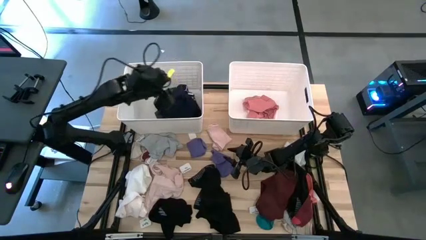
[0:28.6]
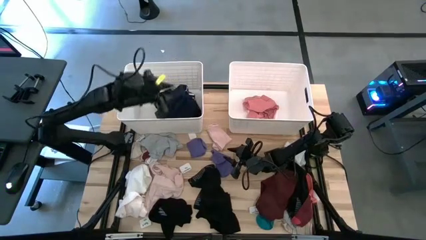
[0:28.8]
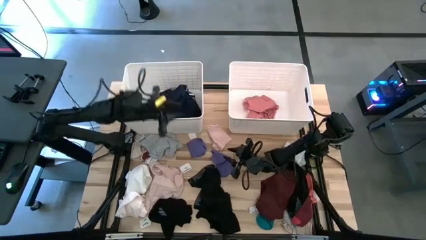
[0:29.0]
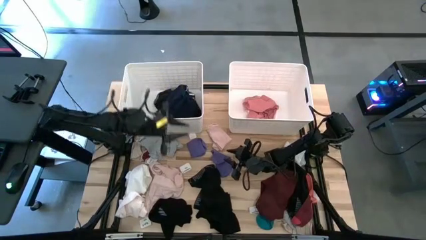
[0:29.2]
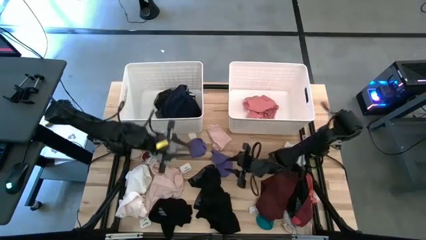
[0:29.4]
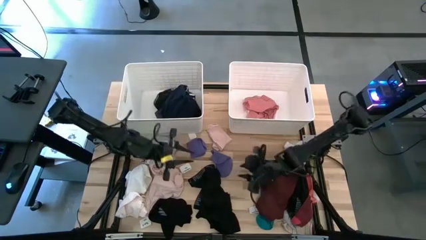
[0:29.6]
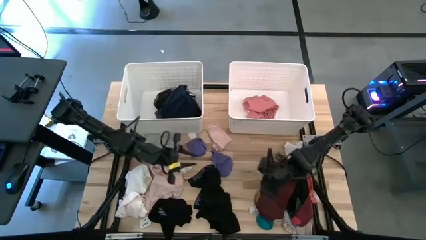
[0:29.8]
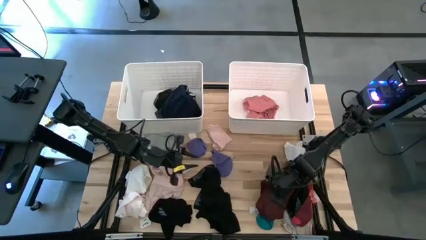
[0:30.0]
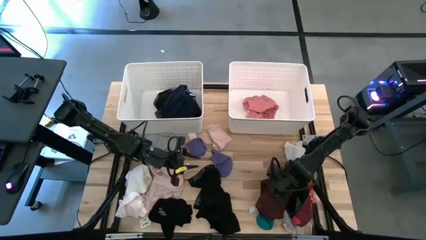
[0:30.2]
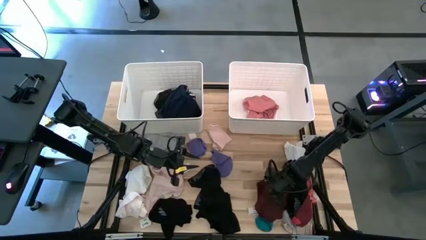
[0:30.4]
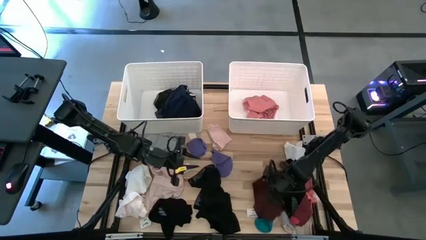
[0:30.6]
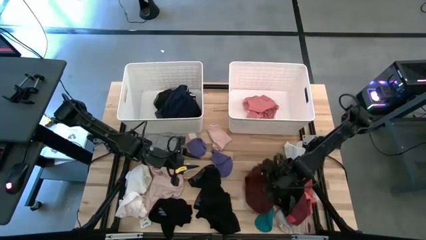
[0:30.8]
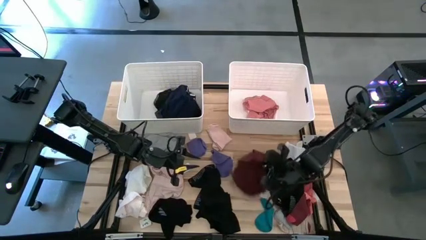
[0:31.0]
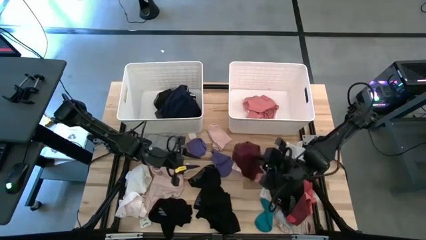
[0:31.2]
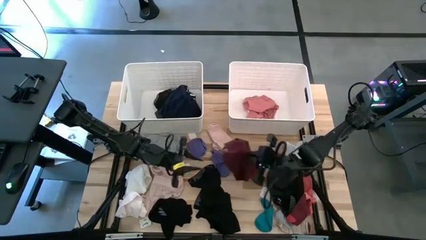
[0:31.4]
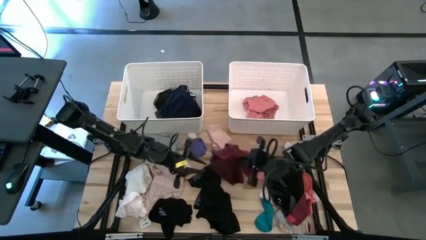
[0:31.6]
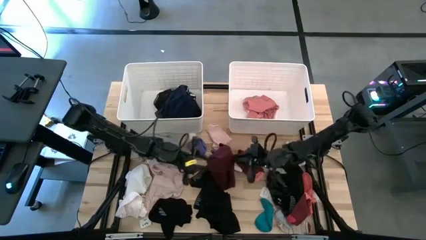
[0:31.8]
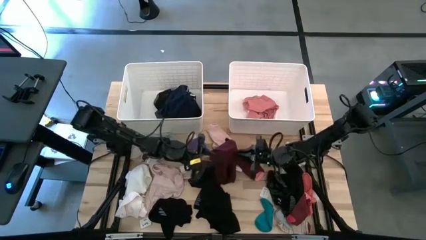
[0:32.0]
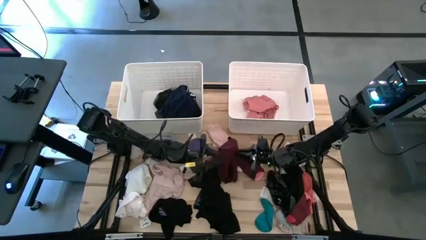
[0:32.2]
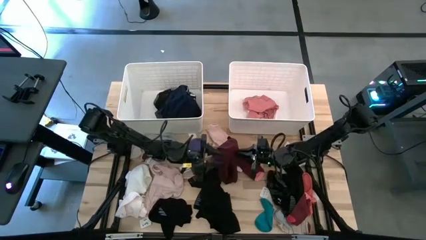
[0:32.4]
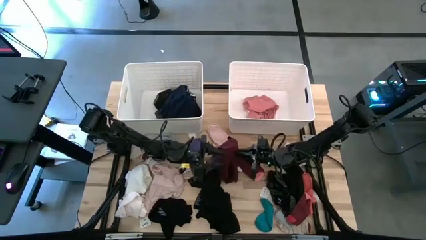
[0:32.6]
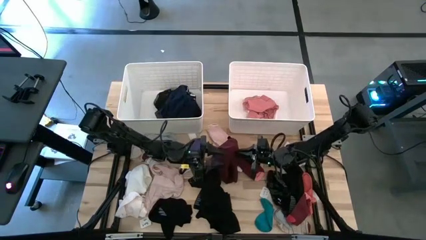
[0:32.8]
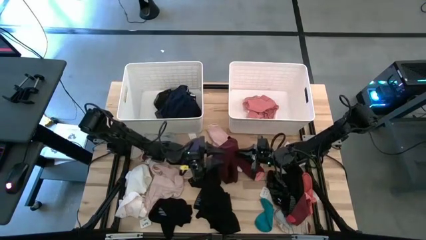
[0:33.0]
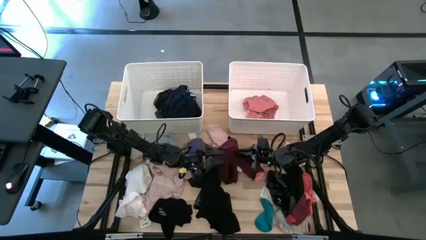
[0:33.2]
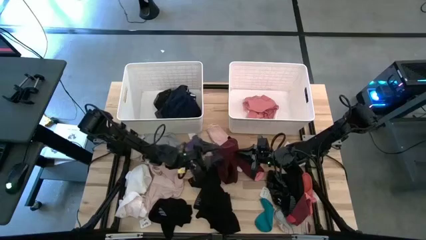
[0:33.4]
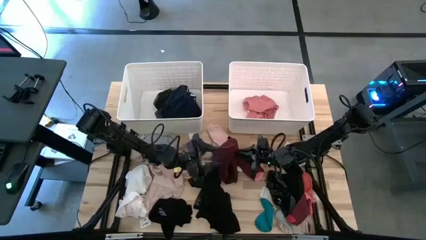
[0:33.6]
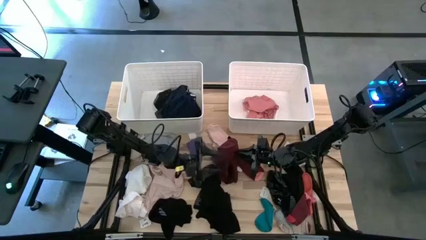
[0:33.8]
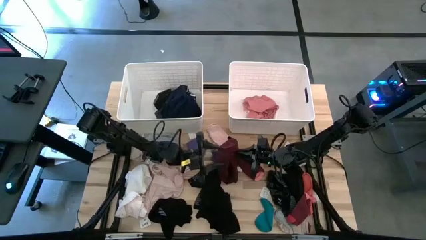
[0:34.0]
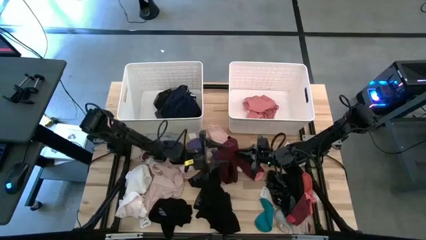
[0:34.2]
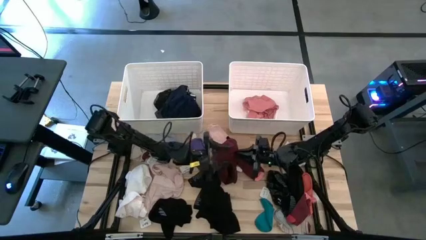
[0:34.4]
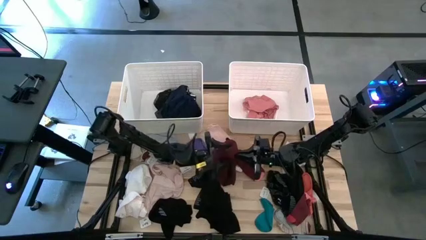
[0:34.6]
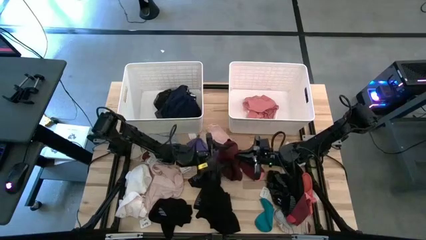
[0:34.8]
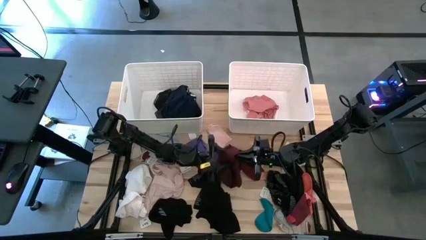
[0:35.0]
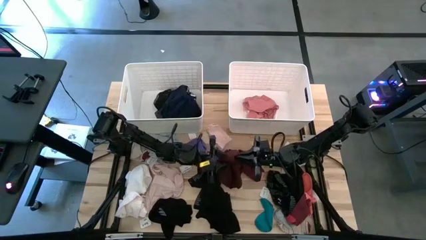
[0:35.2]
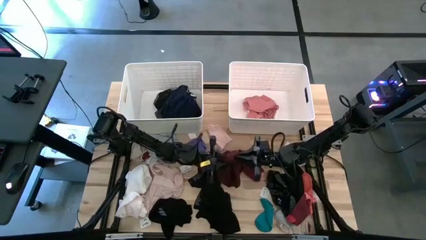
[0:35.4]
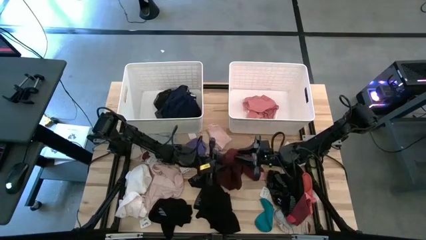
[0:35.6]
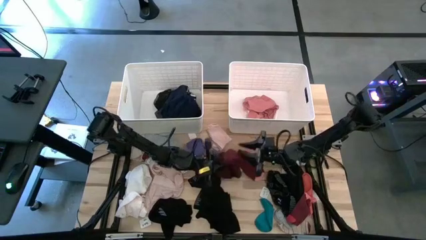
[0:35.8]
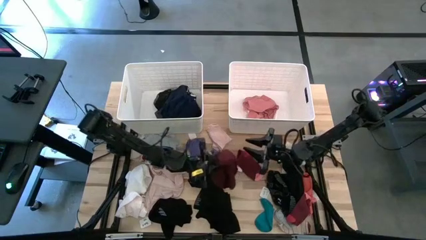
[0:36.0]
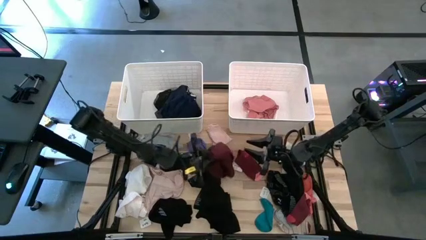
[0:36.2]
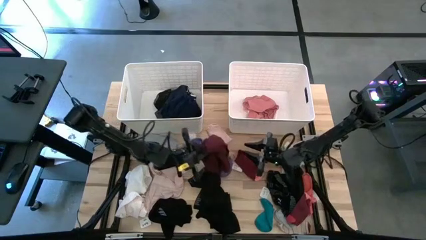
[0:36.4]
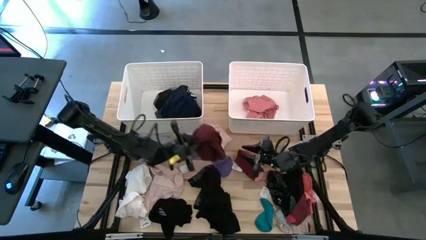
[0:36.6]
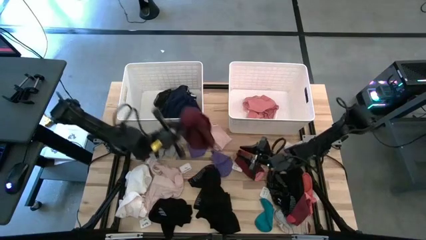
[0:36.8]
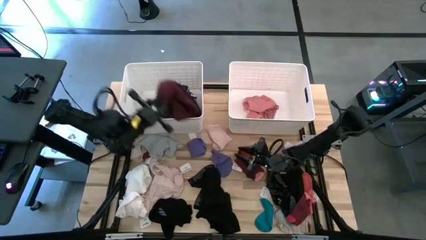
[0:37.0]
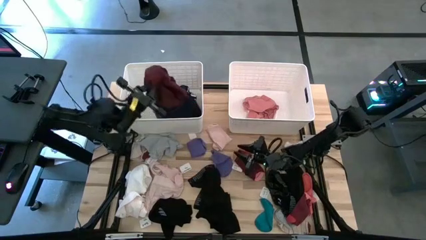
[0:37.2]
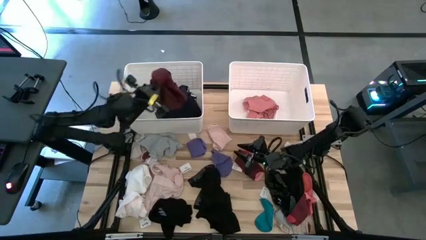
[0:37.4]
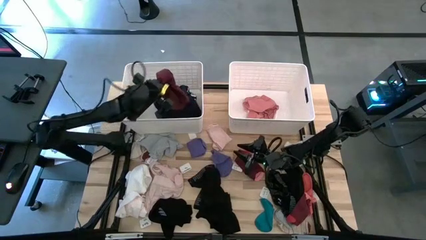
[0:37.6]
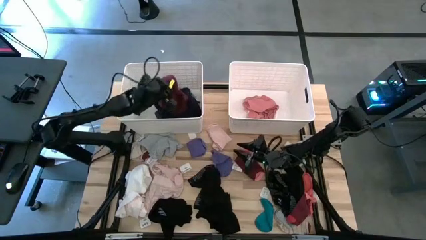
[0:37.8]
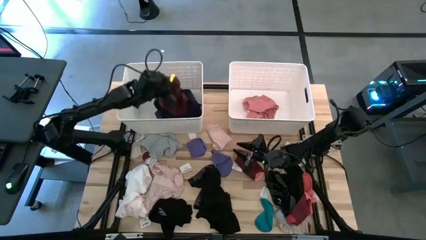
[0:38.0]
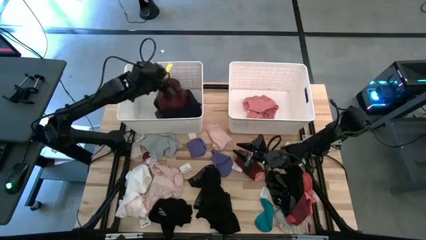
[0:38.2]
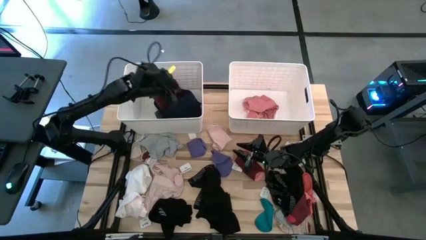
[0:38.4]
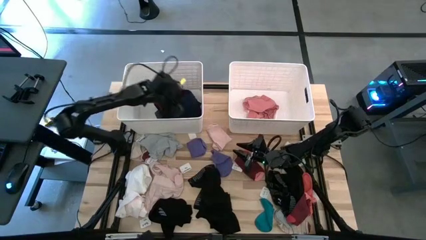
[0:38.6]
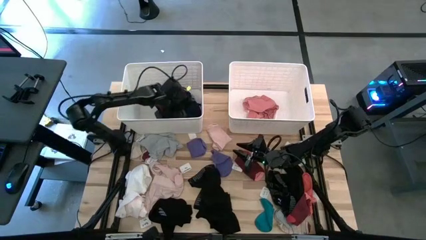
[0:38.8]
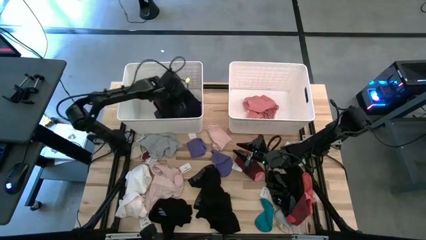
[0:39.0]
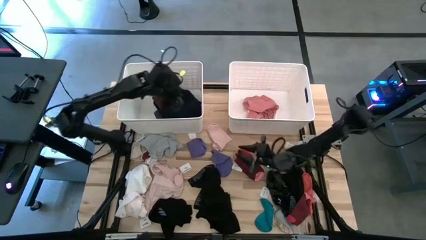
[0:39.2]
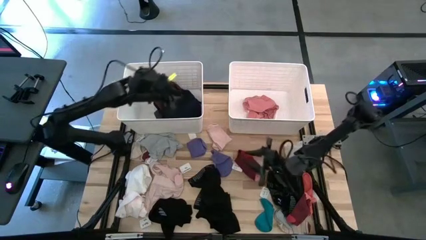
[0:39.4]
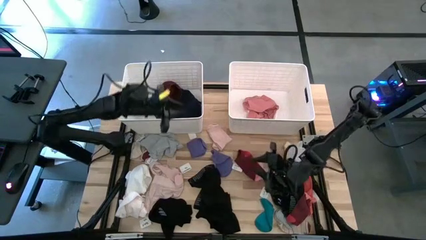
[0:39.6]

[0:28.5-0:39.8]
Task: Sort clothes
Put the red shorts into the left white laundry bin

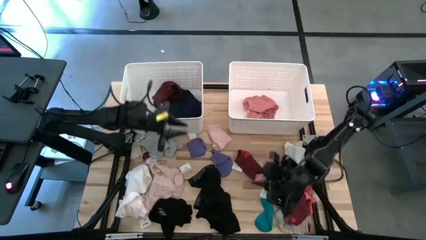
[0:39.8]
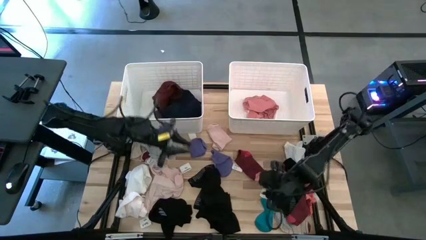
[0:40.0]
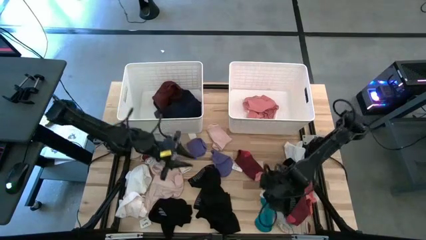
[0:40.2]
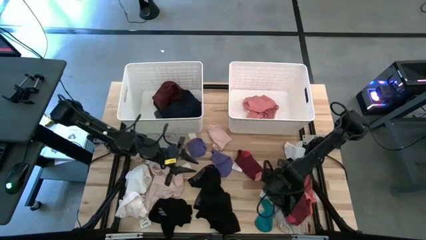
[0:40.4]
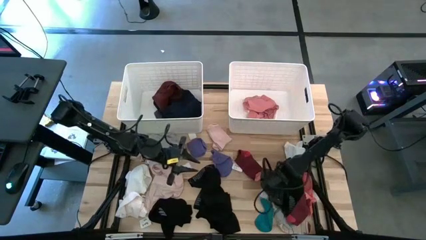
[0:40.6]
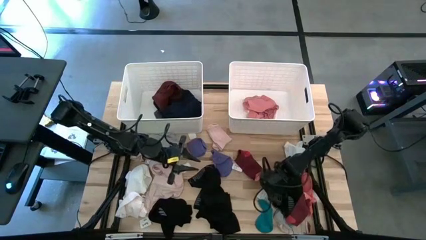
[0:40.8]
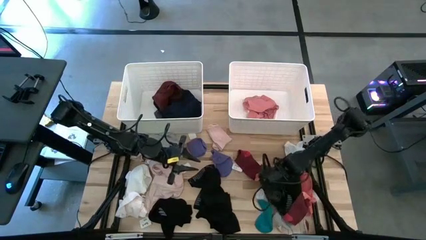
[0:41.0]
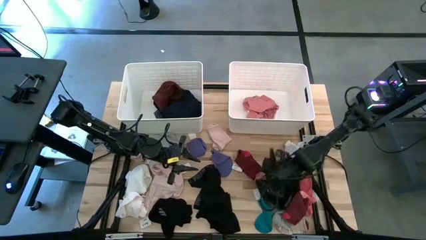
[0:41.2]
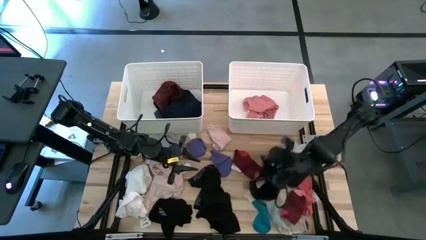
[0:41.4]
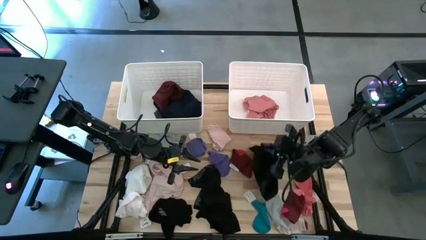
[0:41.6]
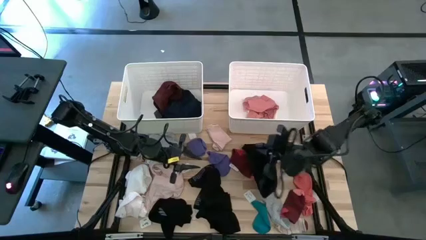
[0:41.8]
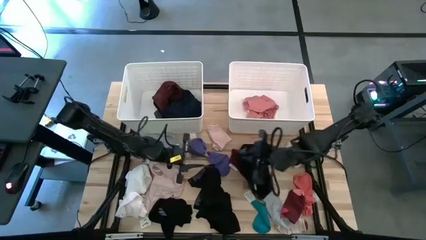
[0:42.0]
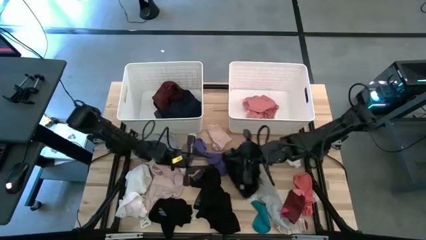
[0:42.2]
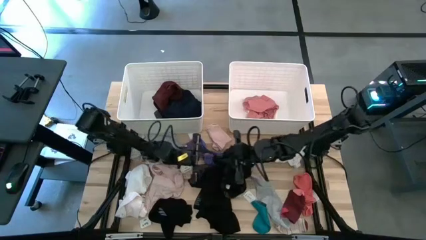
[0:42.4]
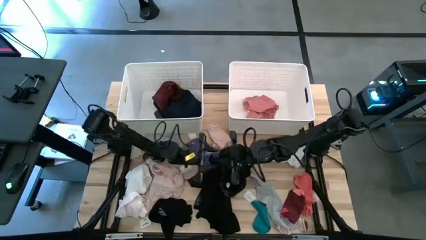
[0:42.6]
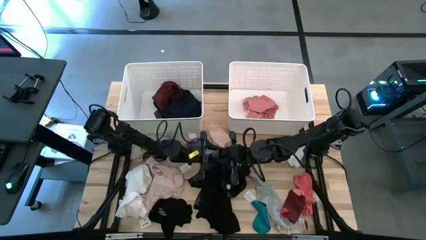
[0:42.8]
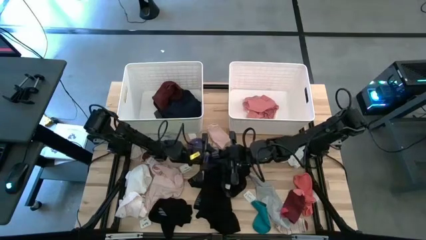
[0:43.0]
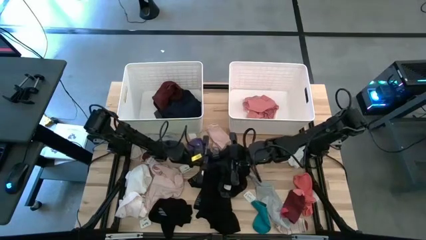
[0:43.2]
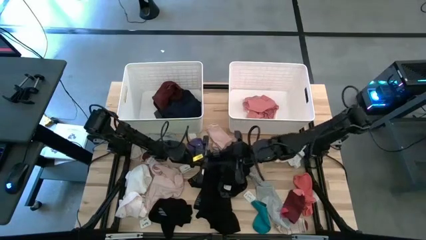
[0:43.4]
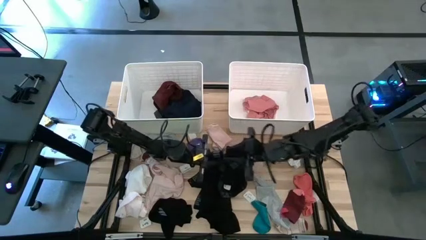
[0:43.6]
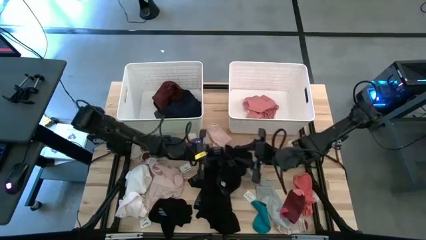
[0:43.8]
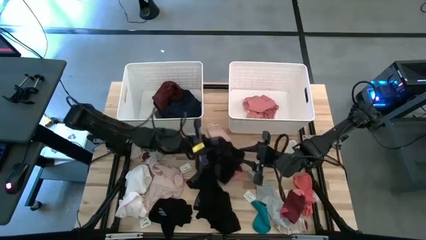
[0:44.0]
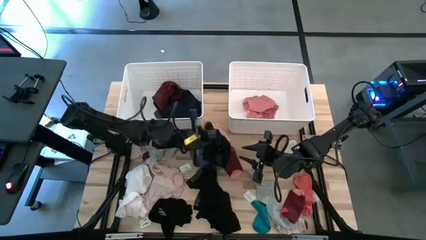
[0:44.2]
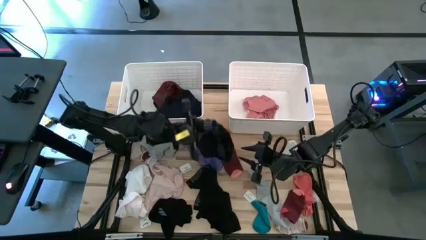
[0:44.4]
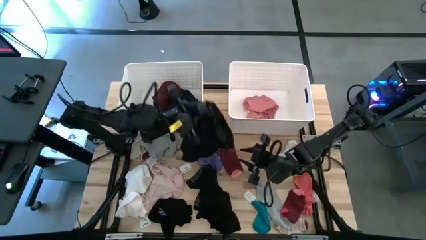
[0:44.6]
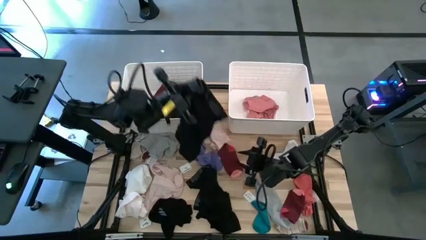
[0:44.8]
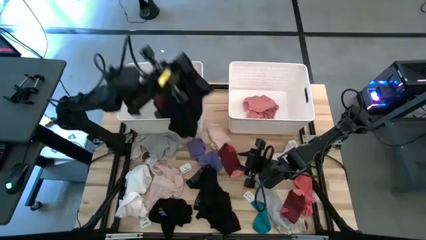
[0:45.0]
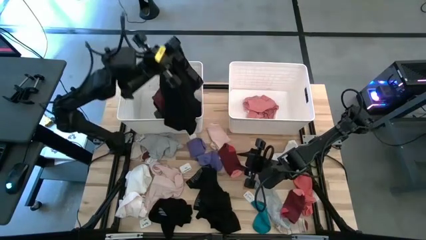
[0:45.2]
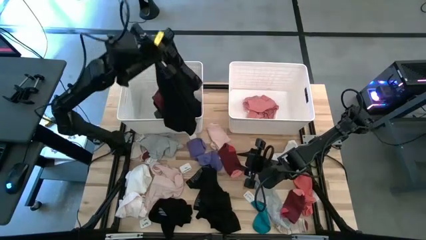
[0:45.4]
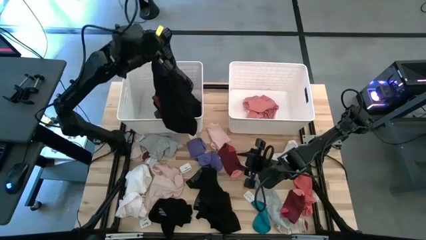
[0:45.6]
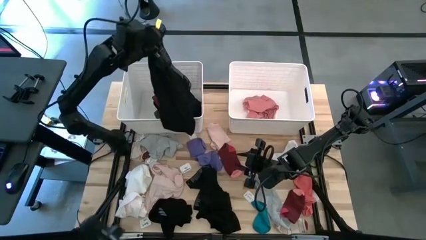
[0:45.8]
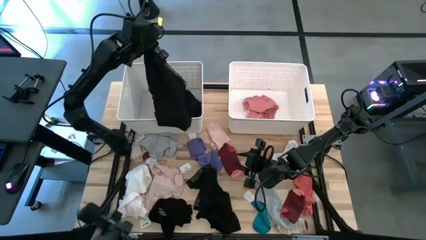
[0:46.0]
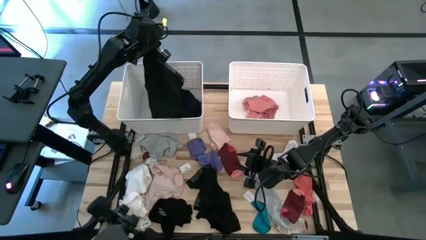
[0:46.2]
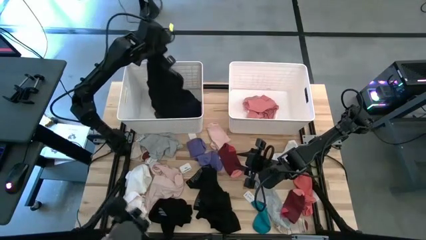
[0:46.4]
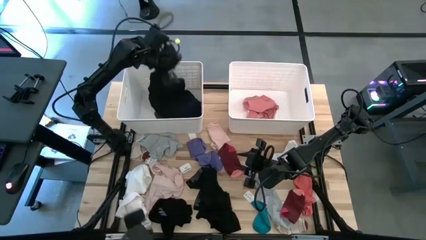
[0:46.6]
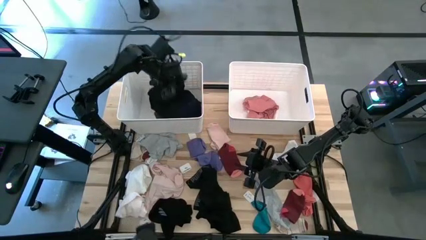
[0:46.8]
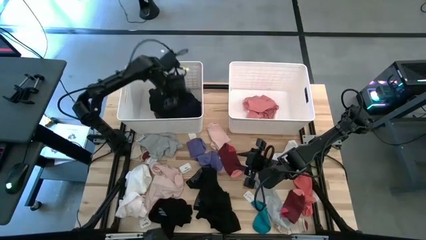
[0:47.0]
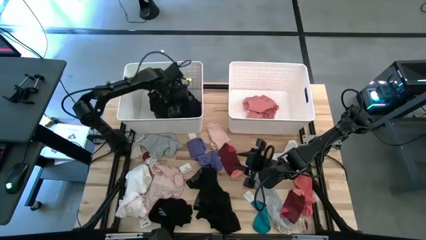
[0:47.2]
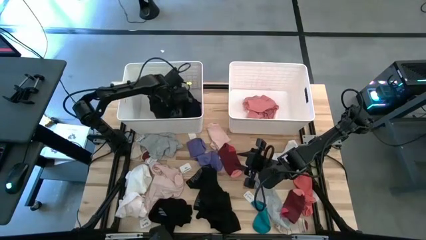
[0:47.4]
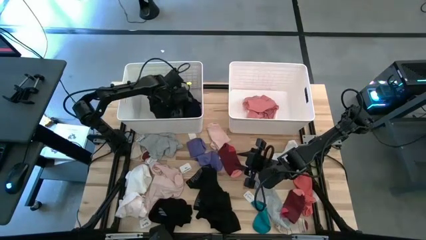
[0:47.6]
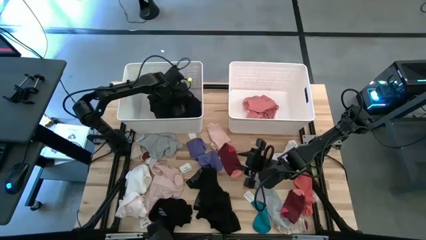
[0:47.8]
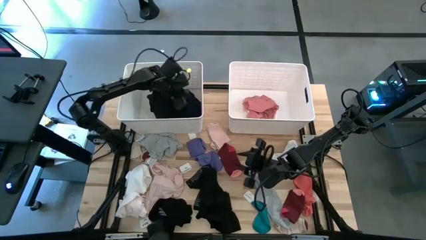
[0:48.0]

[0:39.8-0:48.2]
Put the black boxer into the left white laundry bin
